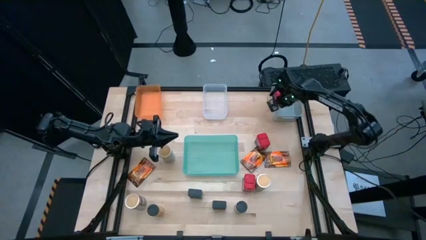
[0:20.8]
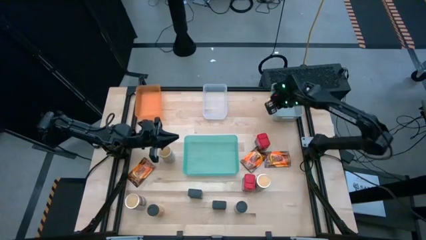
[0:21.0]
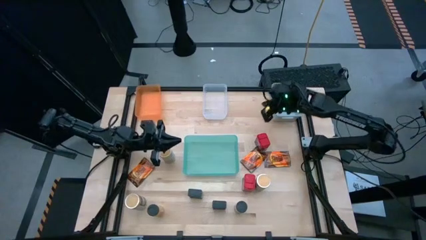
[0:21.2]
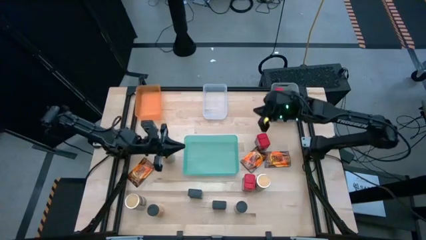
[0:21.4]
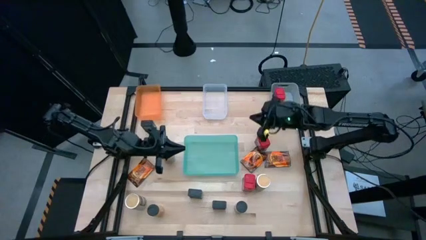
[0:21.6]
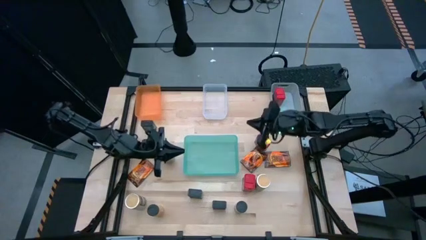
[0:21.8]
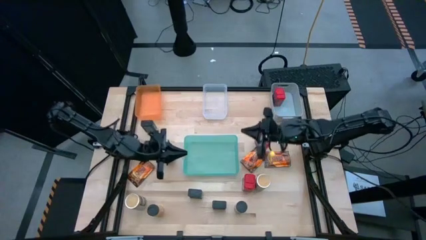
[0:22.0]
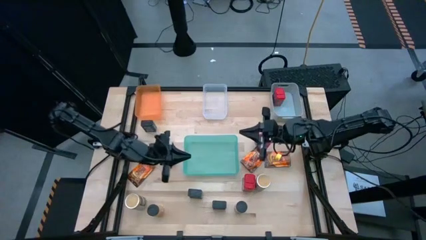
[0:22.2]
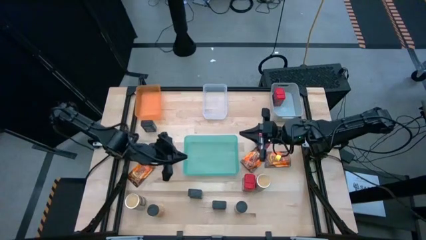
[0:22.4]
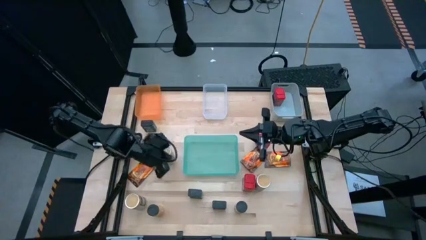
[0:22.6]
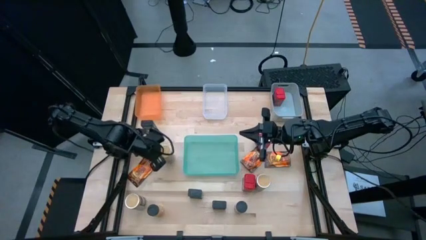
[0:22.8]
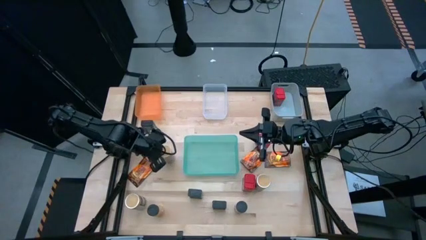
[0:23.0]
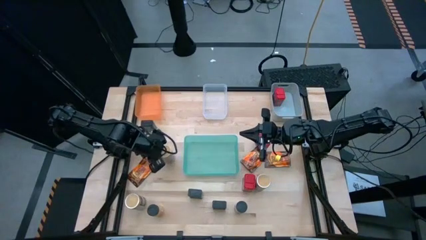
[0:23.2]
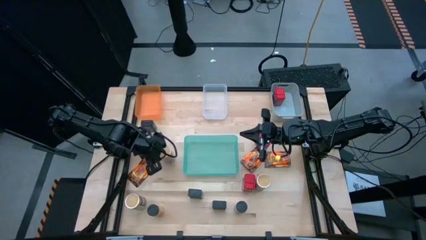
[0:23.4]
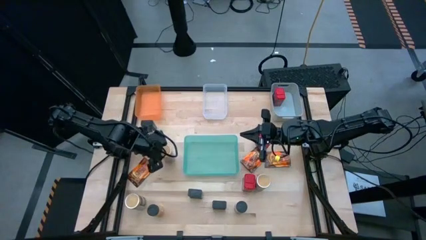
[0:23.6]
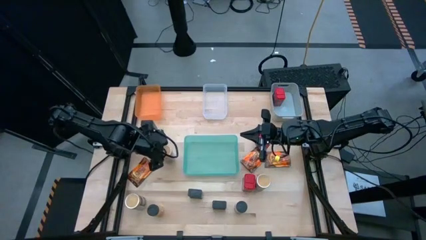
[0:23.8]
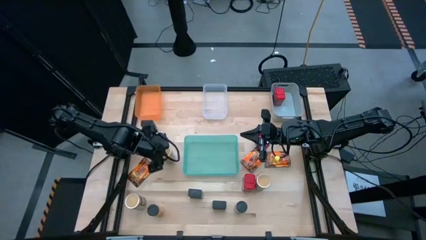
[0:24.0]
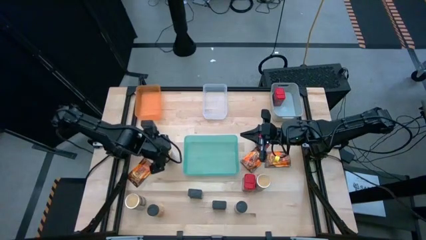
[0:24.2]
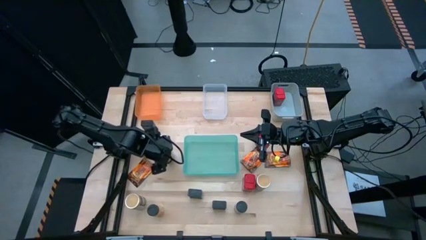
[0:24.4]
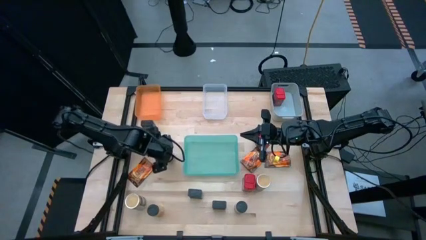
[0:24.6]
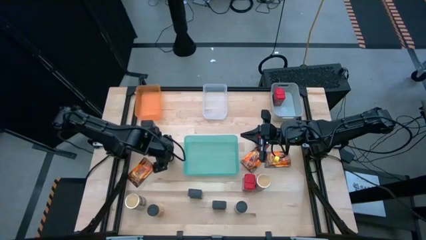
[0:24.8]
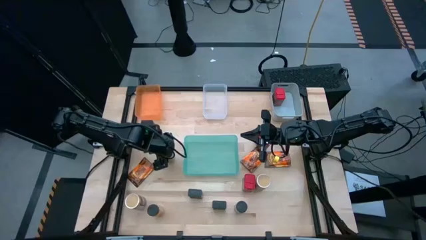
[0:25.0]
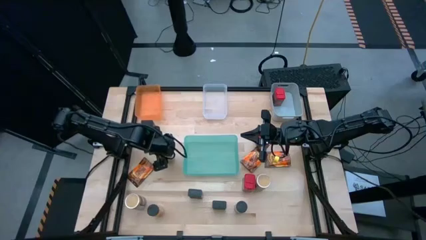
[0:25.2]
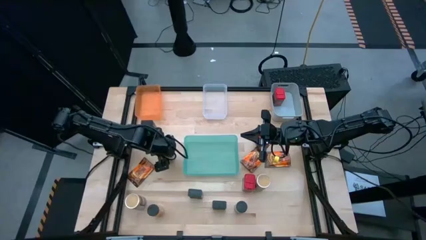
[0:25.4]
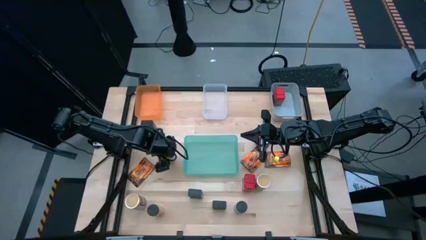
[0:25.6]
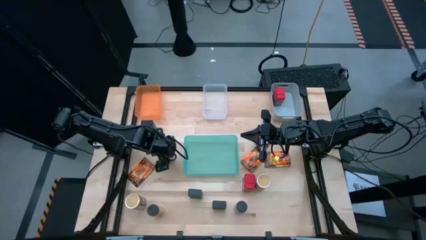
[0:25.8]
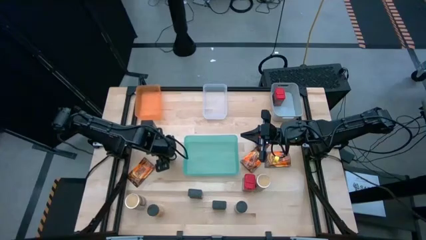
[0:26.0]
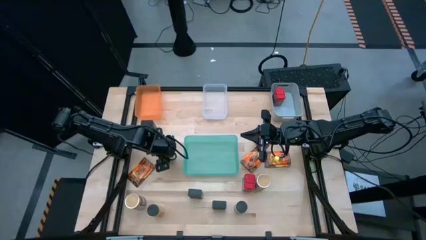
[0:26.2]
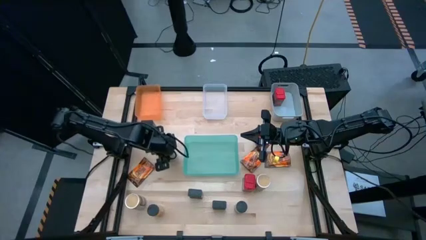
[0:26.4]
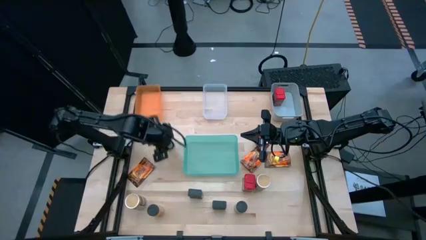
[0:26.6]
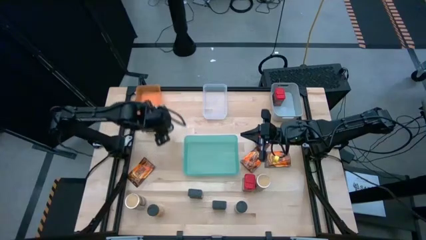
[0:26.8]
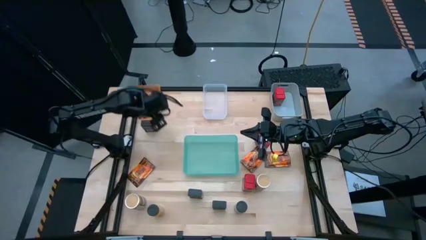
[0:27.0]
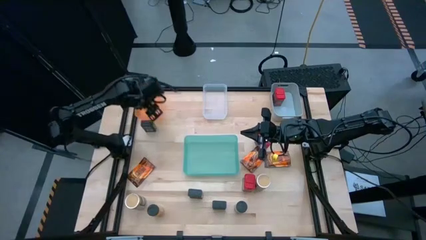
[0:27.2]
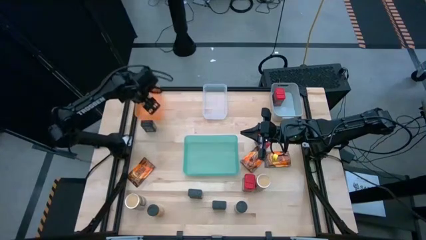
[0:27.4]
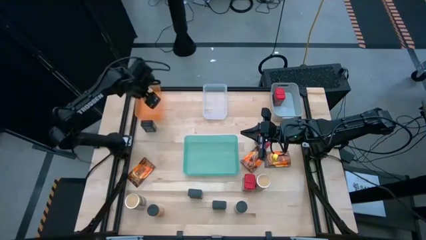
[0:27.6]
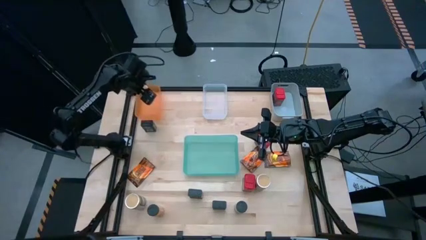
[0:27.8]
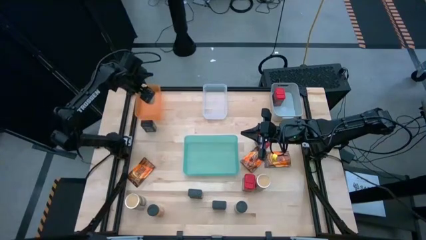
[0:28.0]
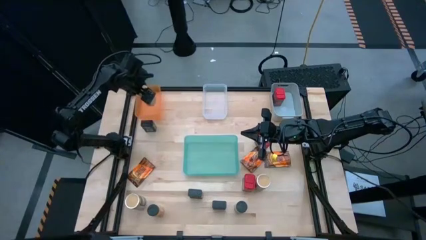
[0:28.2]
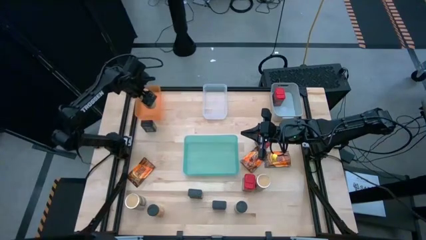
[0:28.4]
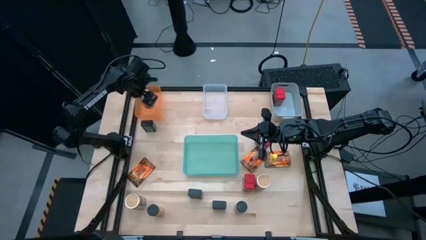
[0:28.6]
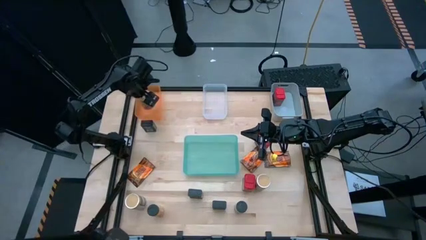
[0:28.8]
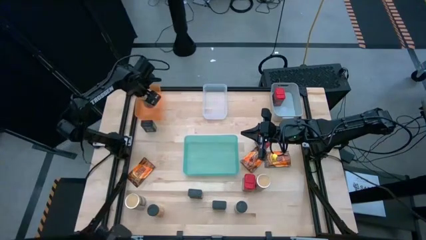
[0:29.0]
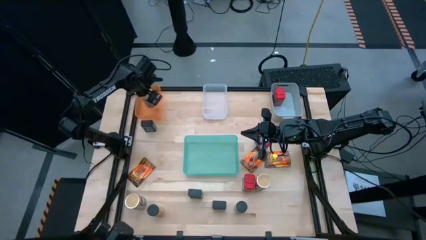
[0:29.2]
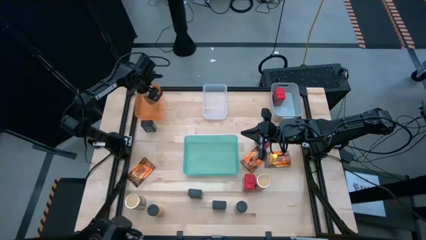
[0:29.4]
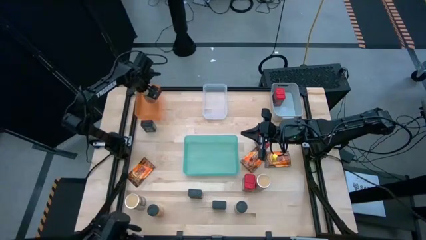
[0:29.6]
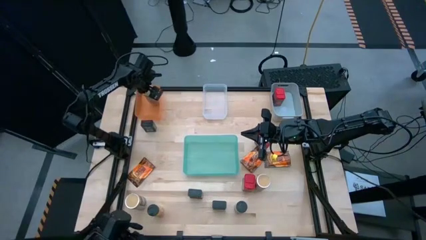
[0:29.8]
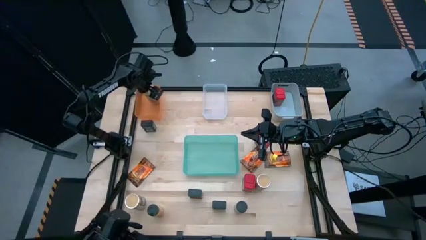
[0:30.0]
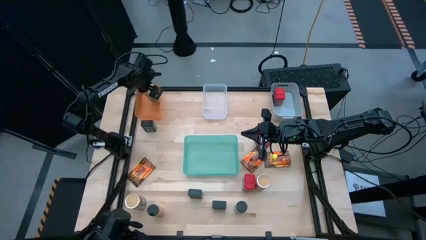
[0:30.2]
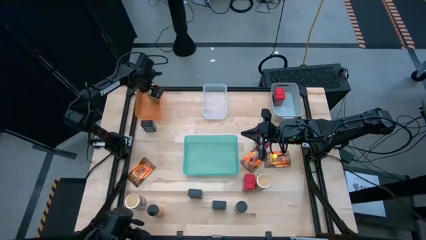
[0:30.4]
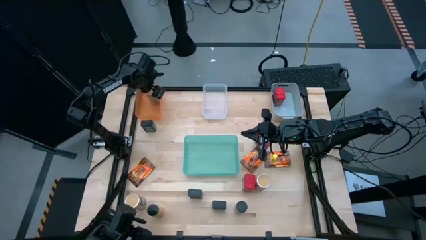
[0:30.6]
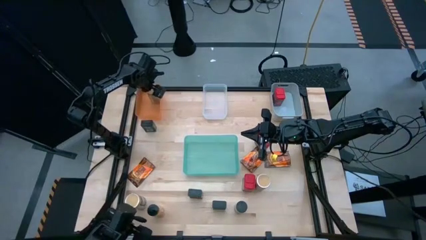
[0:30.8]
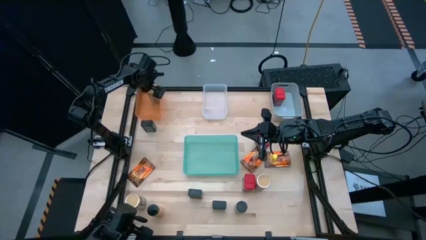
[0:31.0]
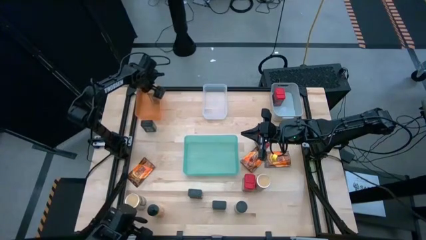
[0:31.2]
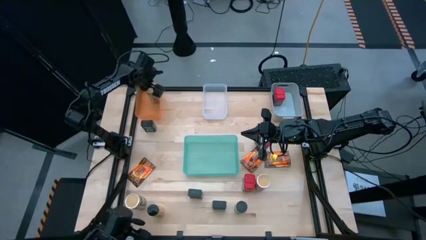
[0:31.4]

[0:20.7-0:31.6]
Task: Sort spices by type
Put the top gold spice bottle into the orange bin

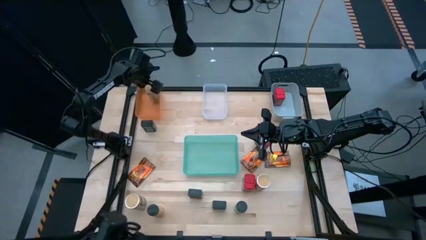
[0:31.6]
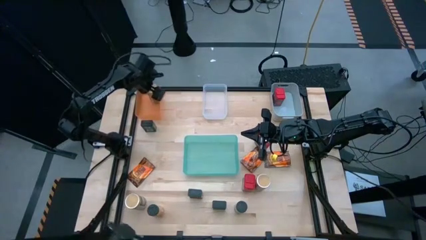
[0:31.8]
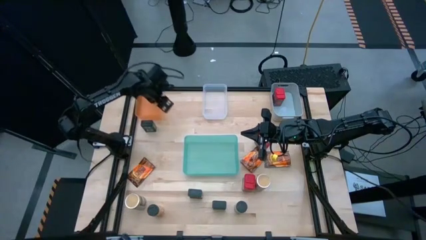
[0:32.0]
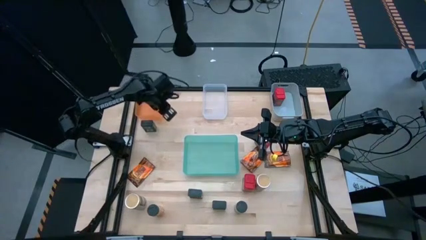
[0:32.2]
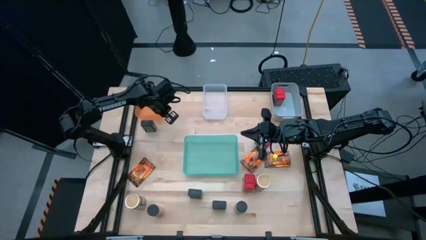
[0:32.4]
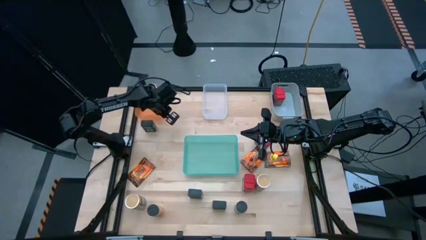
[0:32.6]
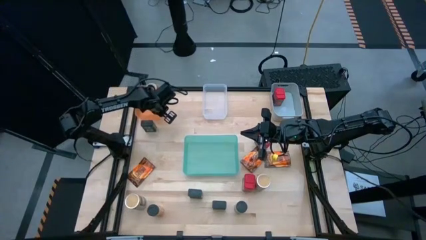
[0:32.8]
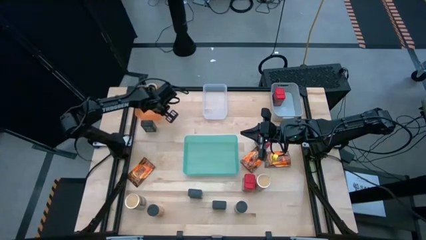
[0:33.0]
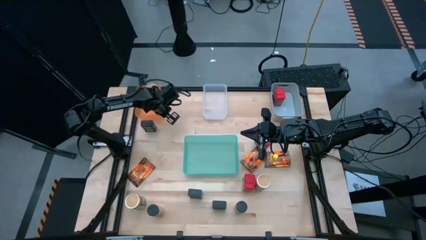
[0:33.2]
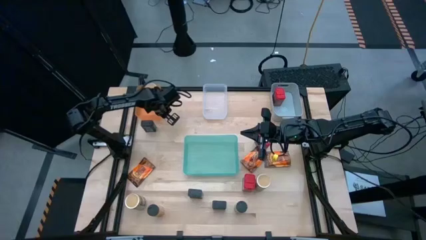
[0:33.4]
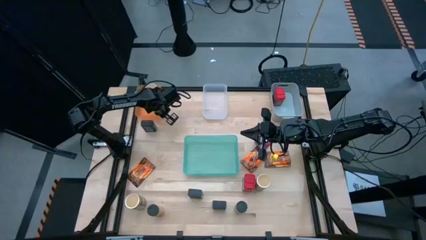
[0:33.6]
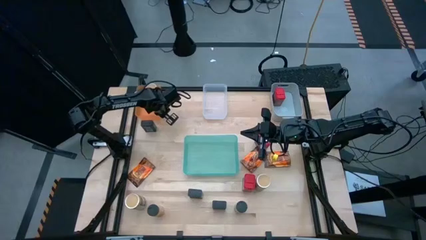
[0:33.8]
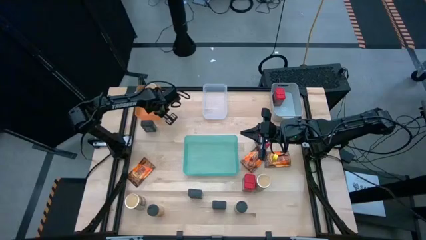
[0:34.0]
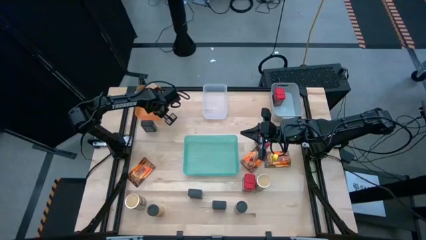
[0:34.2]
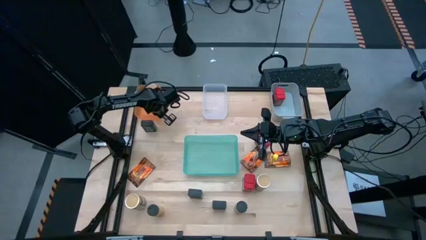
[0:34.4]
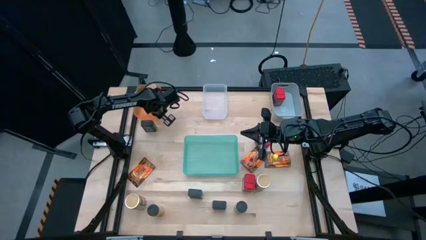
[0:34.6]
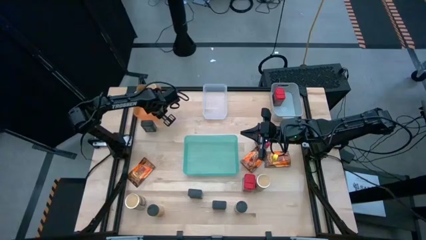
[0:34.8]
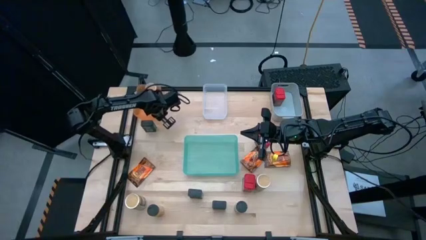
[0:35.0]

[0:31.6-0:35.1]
Adjust the orange bin

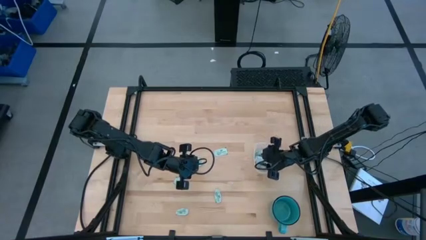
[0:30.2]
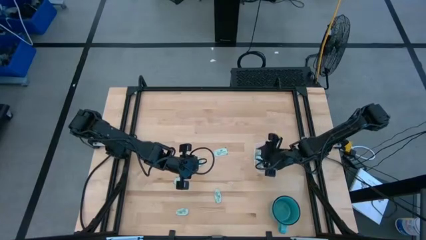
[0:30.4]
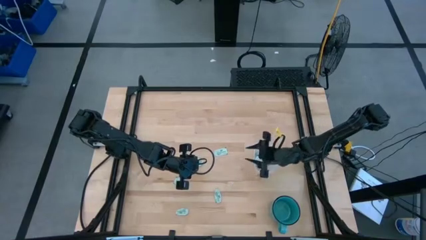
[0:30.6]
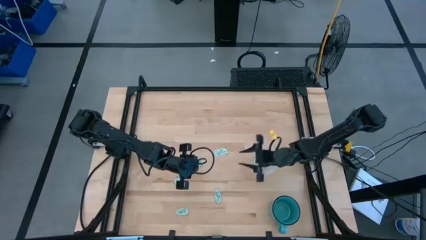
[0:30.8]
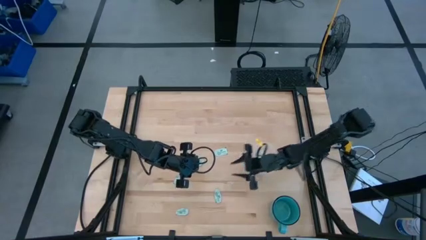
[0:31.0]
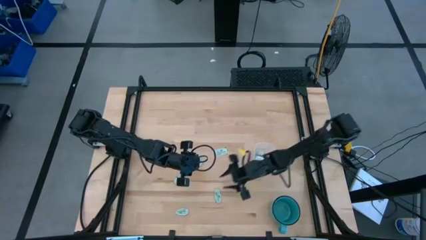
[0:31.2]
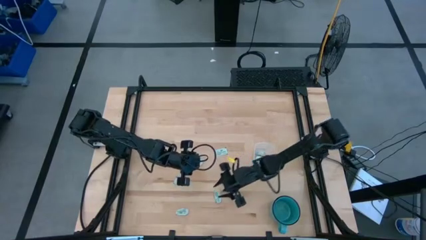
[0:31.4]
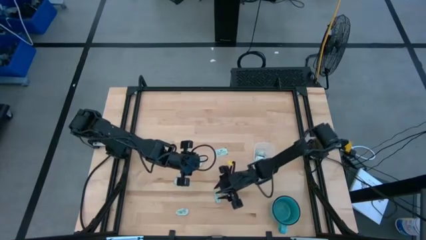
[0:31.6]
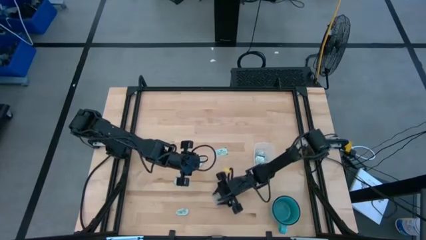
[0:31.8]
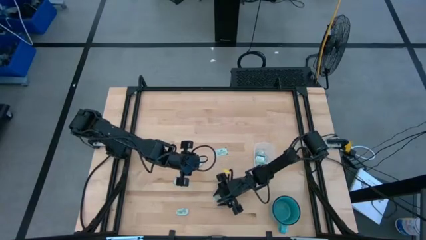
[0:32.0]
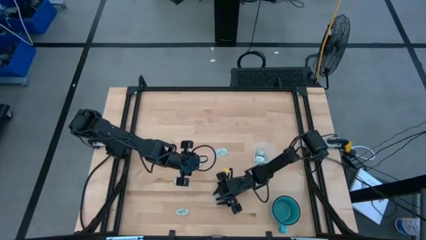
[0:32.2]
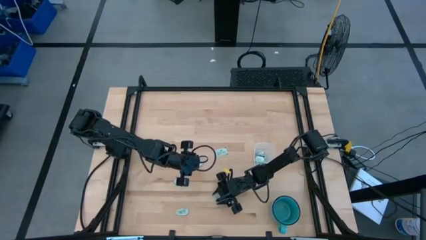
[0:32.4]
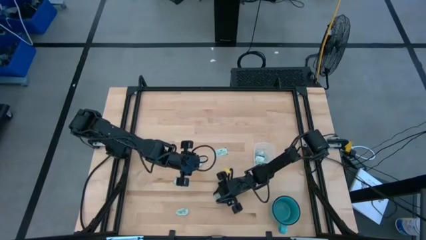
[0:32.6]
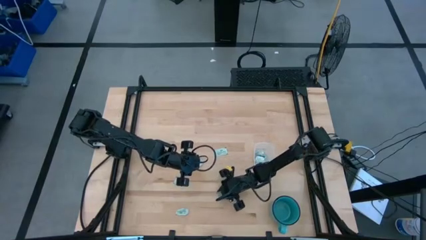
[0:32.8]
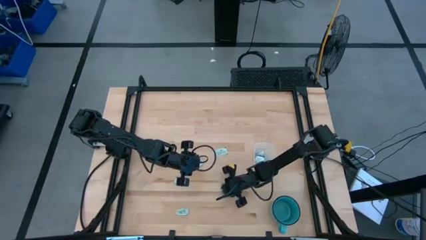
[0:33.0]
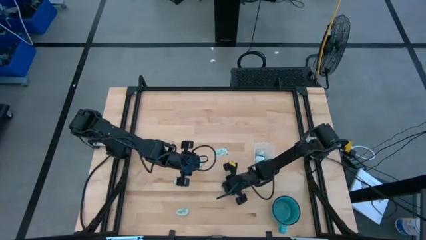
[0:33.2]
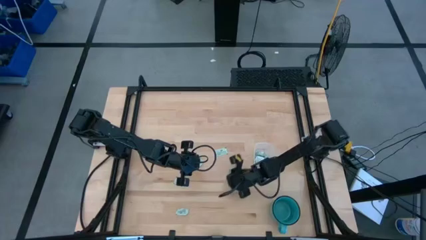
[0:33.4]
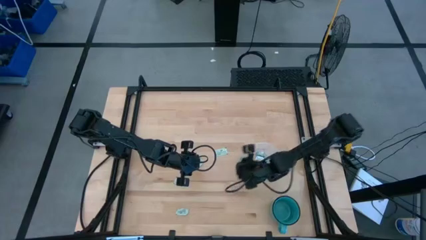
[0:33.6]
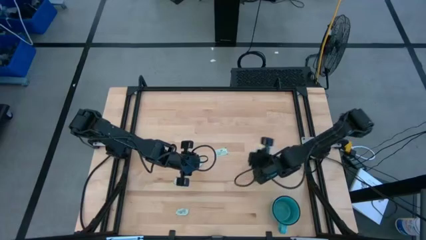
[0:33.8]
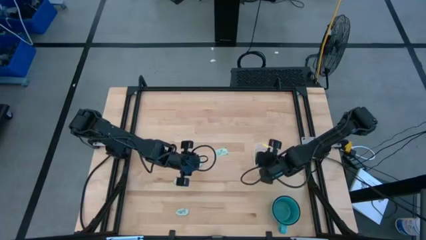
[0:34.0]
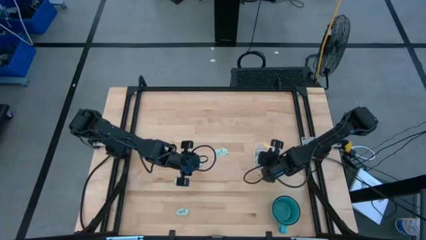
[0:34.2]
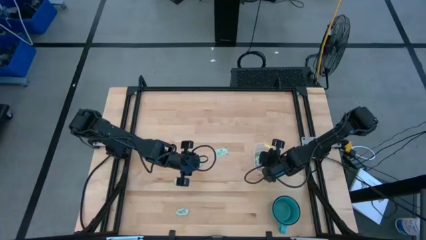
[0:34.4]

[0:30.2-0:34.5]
Task: Pick and place Stevia / Truvia into bins
Put the stevia packet into the bin
